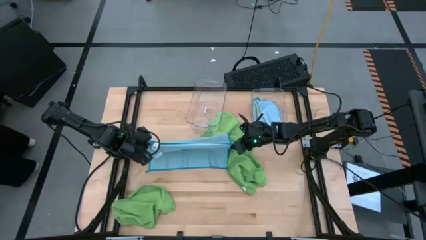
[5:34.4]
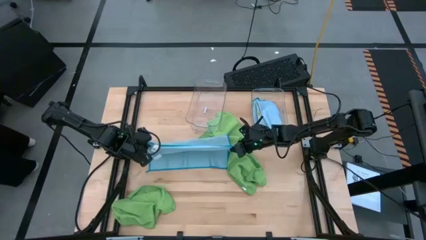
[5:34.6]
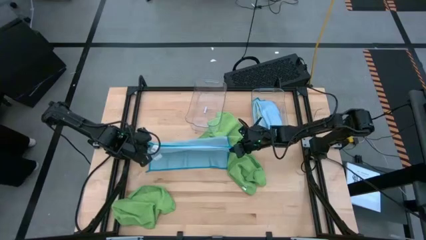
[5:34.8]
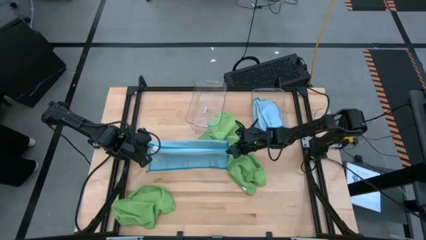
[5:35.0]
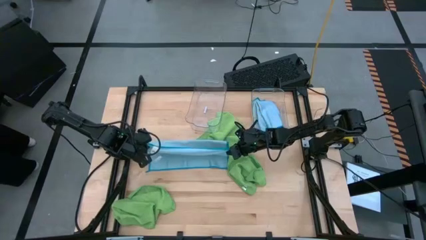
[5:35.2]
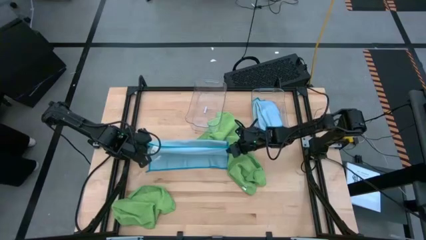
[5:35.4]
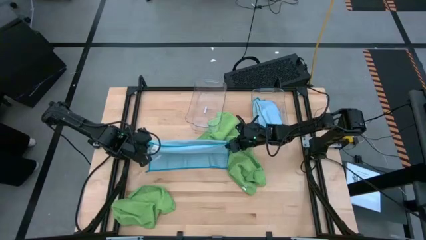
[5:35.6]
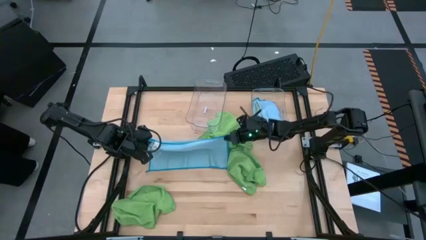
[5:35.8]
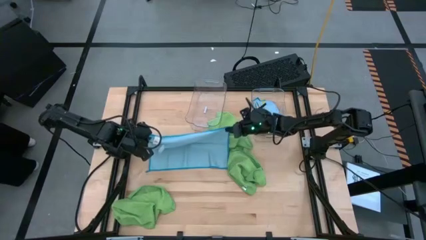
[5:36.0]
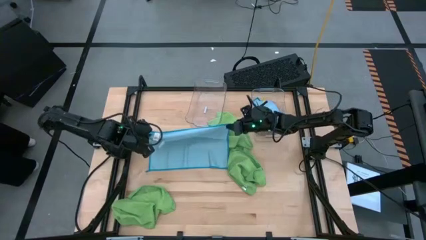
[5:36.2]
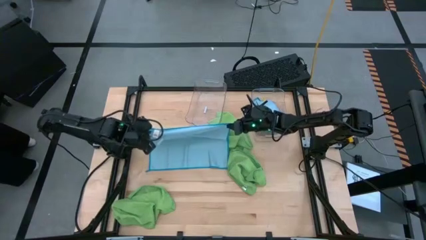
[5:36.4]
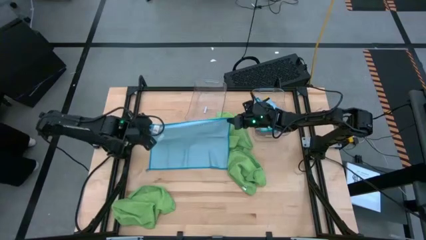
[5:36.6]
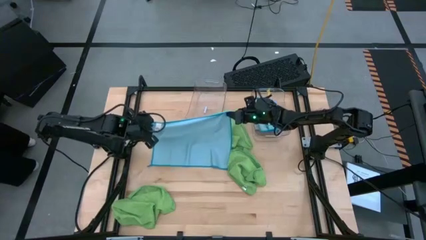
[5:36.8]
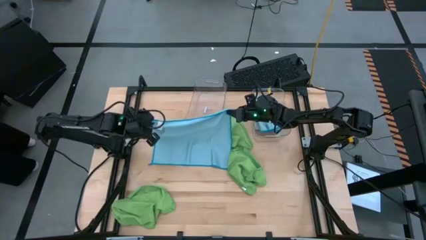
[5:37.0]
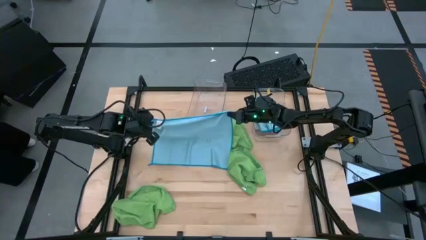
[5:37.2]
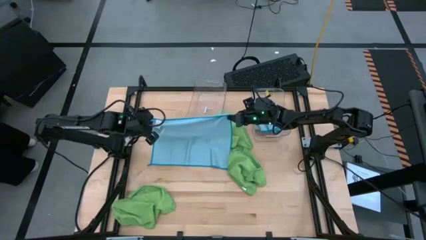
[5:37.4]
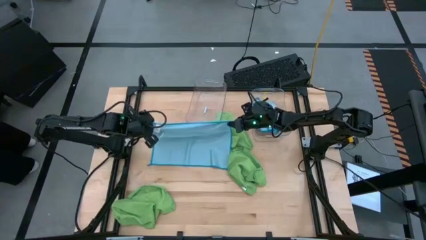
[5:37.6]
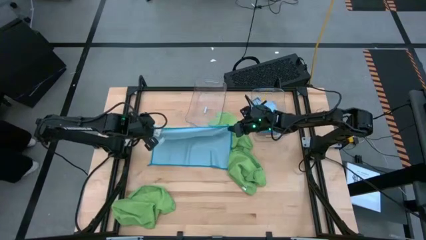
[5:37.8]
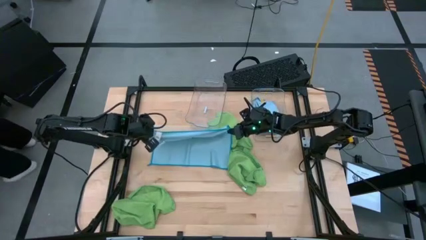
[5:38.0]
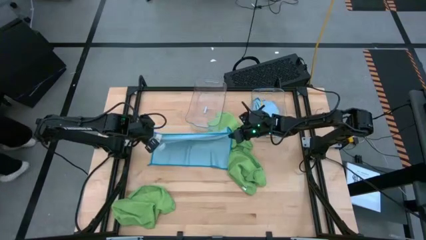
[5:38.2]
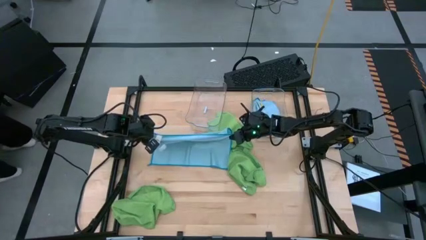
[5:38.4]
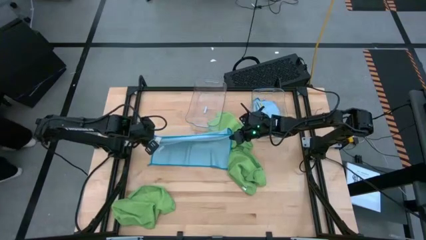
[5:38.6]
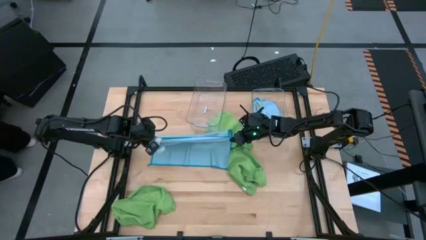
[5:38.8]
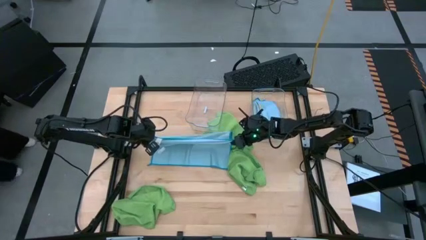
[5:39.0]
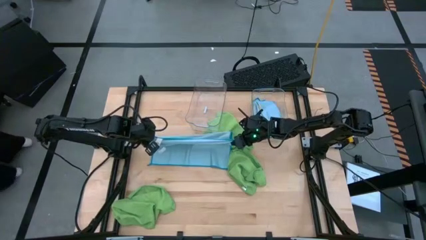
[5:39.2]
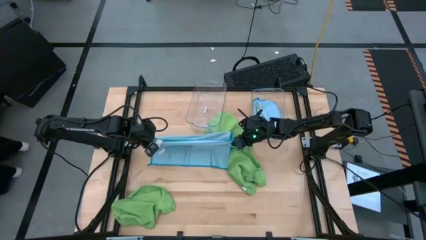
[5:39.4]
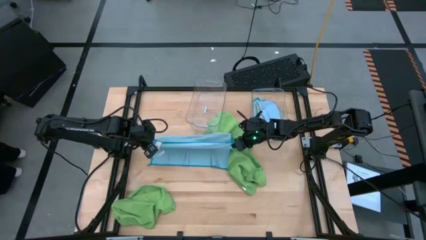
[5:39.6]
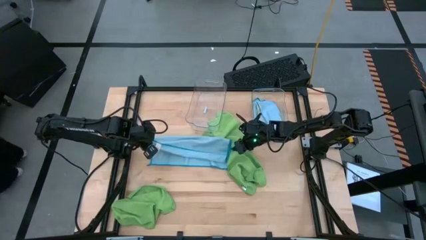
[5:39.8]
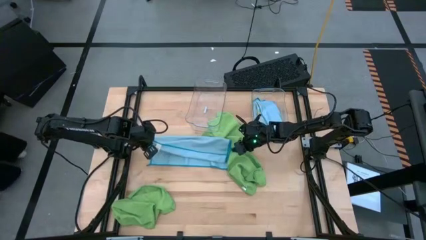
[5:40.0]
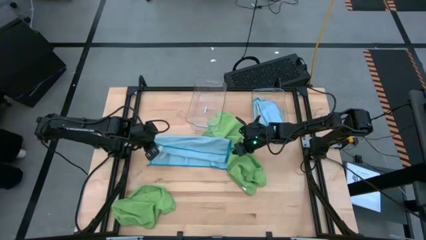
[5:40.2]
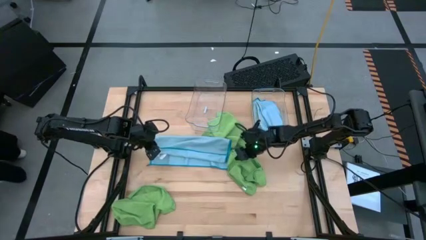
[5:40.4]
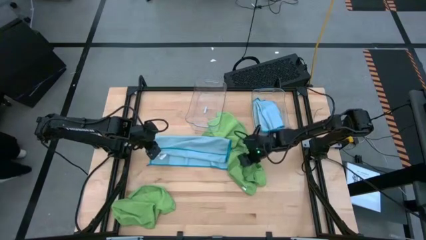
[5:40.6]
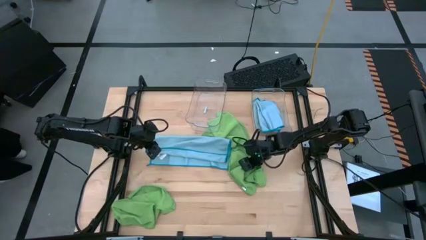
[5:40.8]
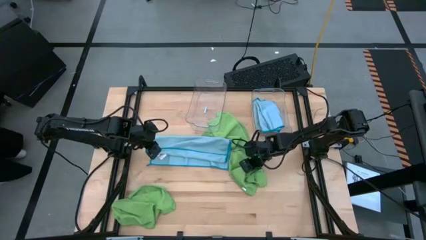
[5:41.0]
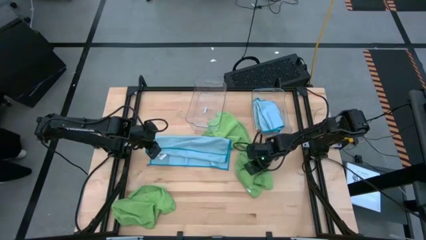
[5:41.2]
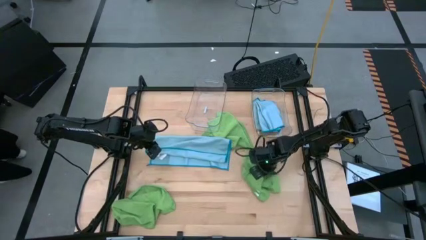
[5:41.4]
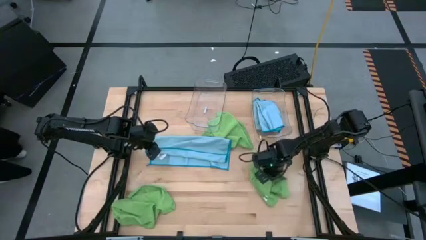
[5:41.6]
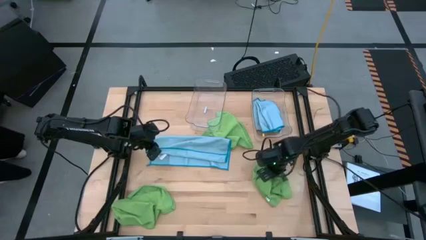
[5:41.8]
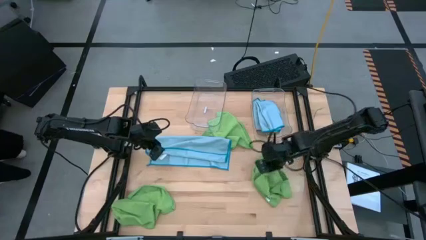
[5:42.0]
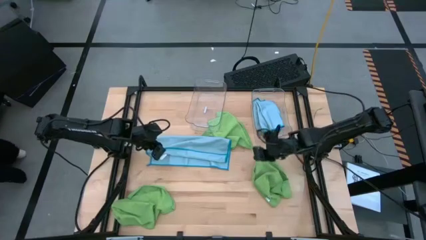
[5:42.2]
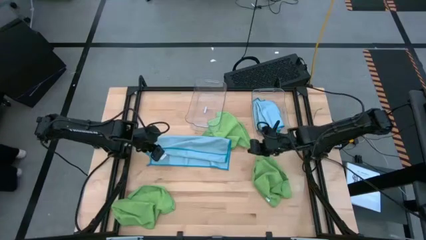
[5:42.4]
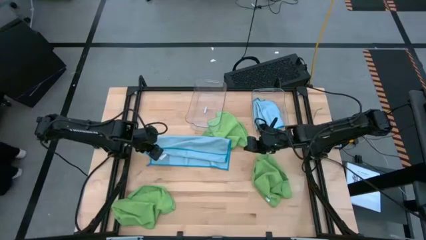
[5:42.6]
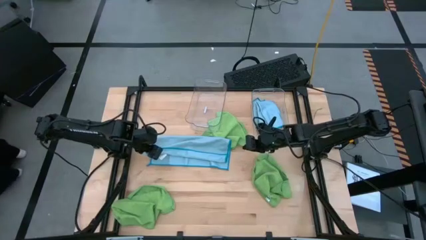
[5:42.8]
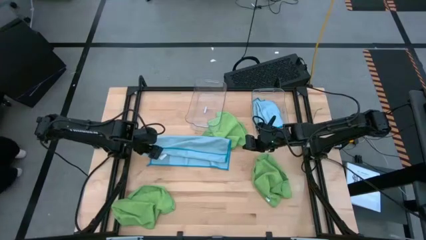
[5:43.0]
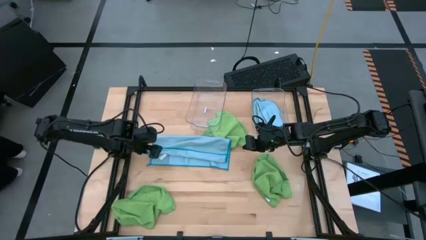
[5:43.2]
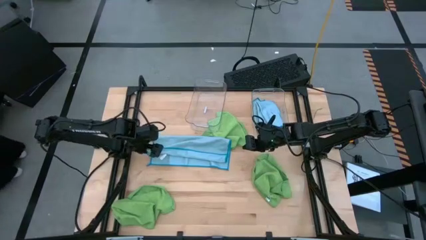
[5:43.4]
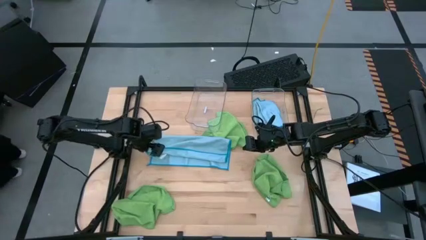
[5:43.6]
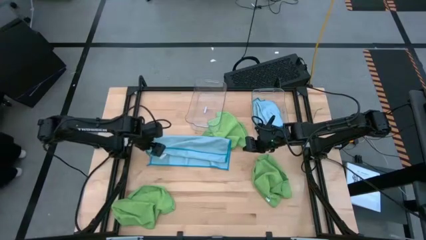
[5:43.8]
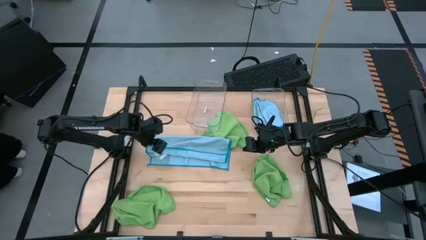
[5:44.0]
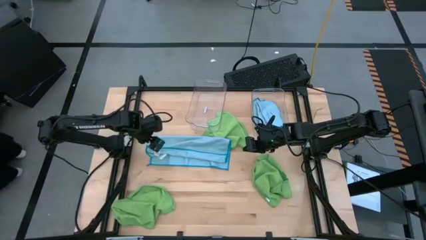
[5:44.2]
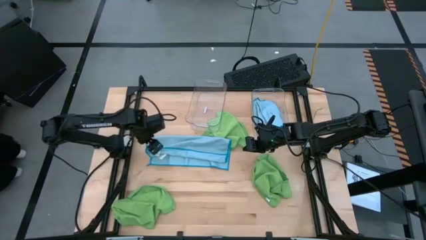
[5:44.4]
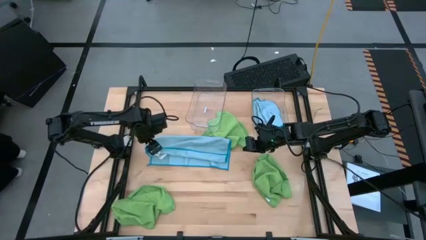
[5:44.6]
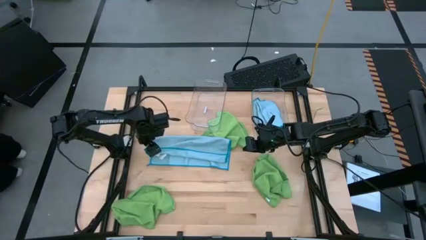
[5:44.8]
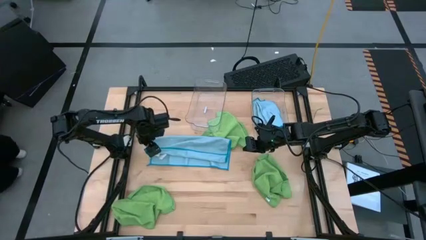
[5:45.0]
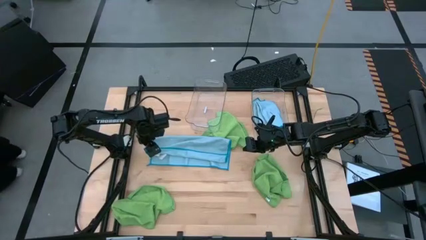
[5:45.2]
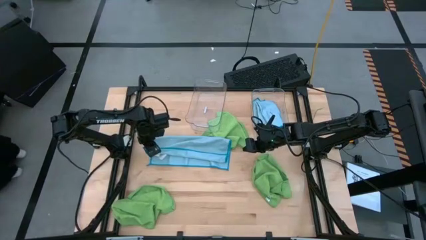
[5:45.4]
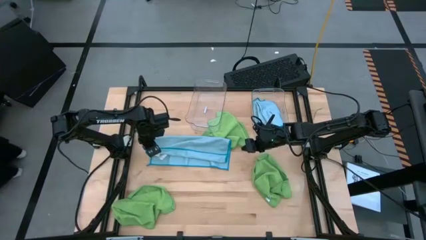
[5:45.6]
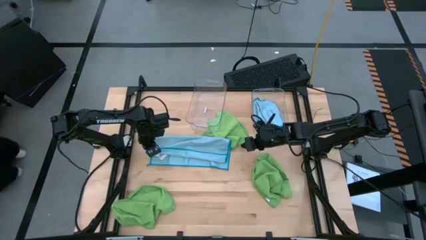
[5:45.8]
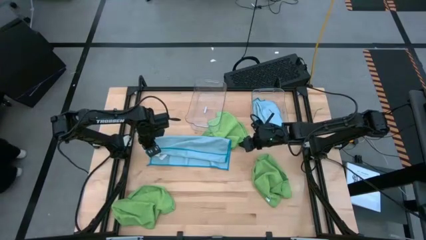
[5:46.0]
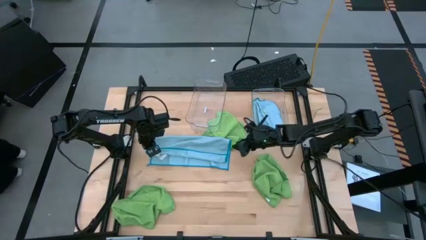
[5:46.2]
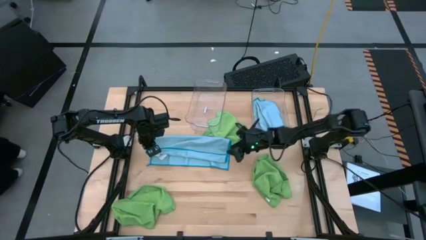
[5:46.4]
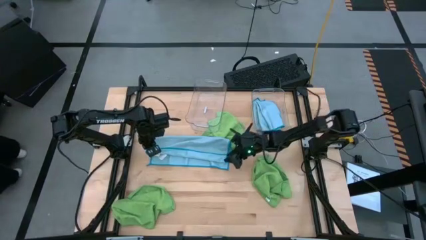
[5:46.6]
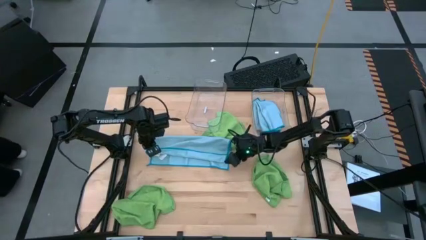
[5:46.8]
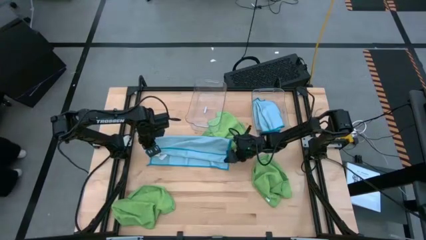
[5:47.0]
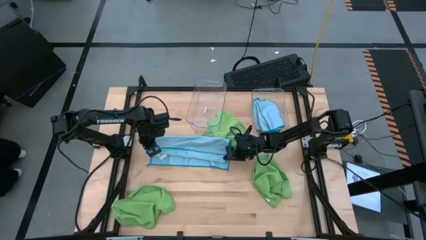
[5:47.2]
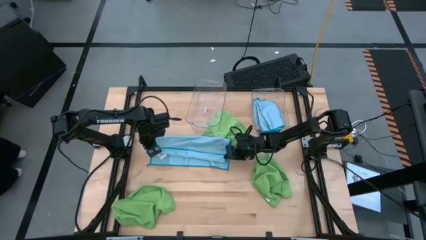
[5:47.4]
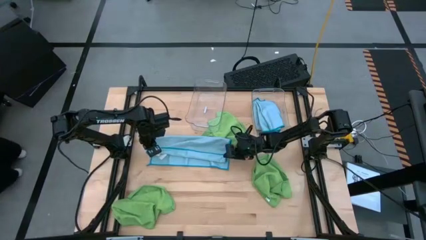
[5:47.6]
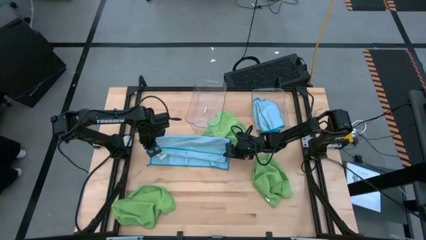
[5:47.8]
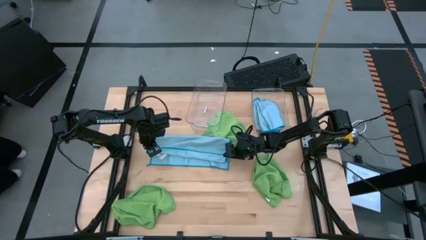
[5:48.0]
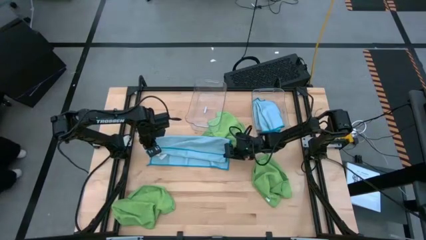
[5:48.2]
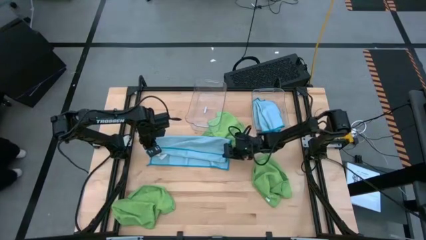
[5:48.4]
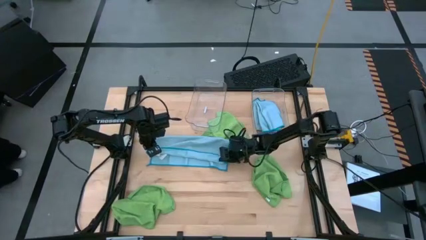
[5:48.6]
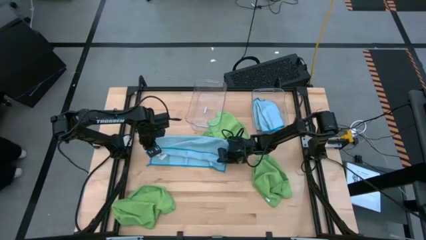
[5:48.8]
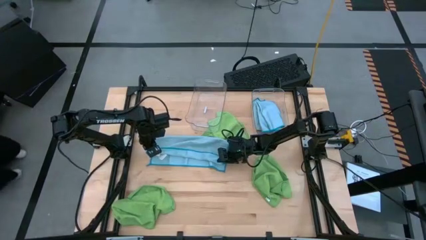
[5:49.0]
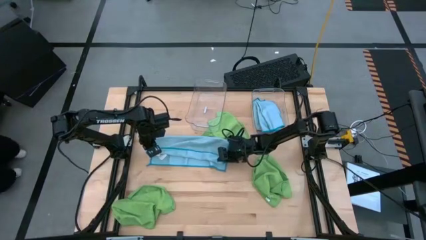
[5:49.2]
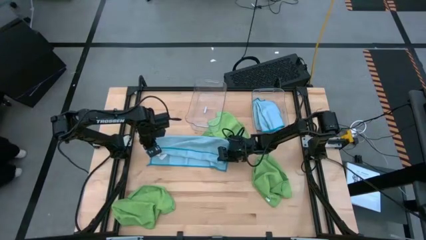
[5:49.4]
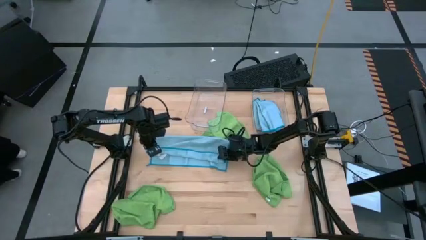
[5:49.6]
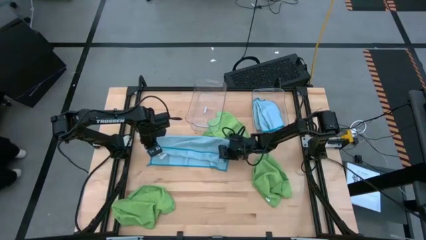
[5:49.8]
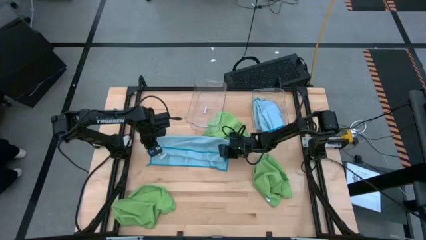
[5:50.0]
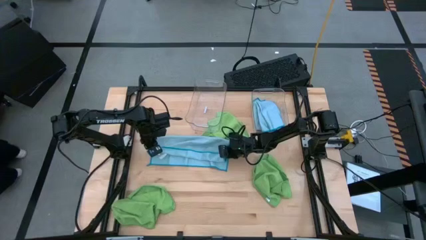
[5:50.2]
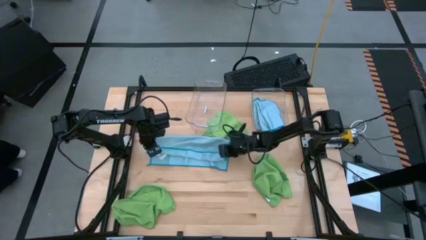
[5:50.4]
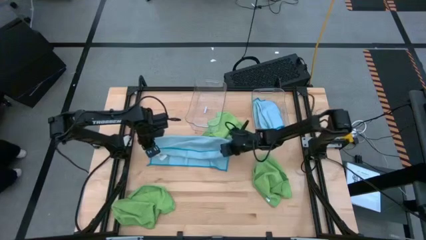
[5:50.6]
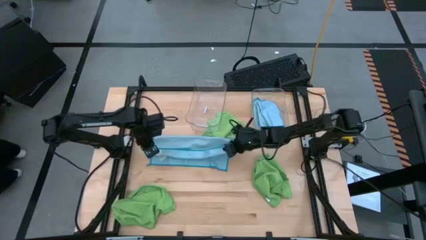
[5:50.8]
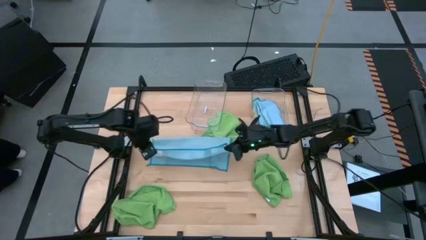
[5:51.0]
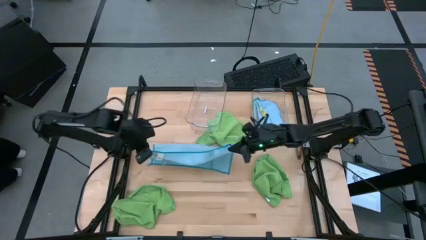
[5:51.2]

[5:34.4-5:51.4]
Task: Fold microfiber towels
Fold the blue microfiber towel
